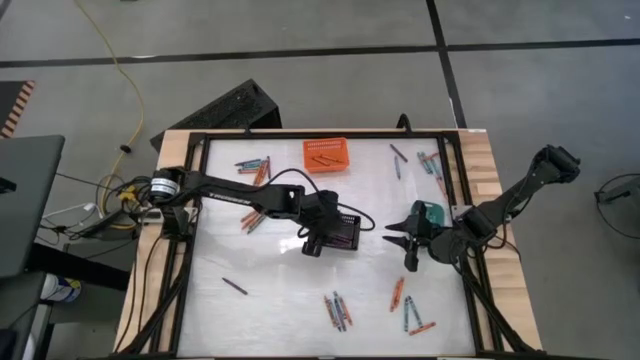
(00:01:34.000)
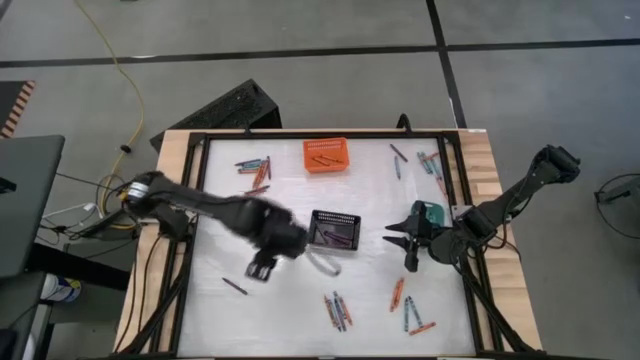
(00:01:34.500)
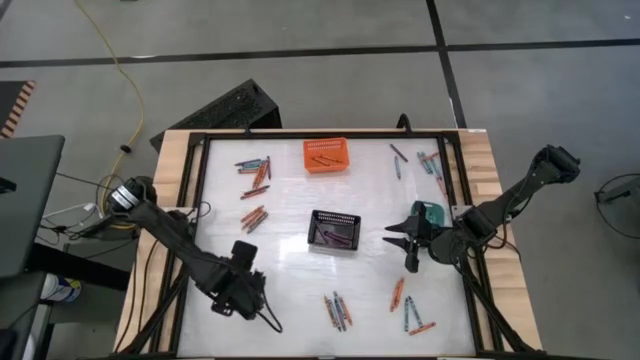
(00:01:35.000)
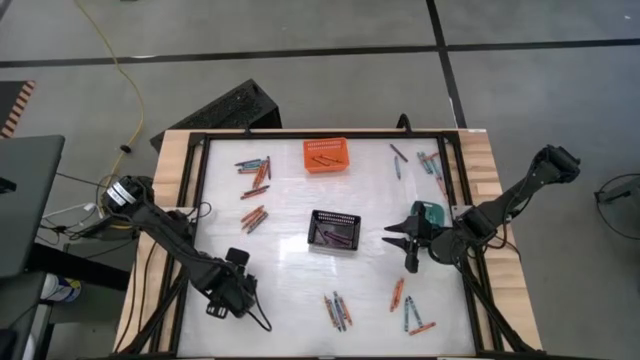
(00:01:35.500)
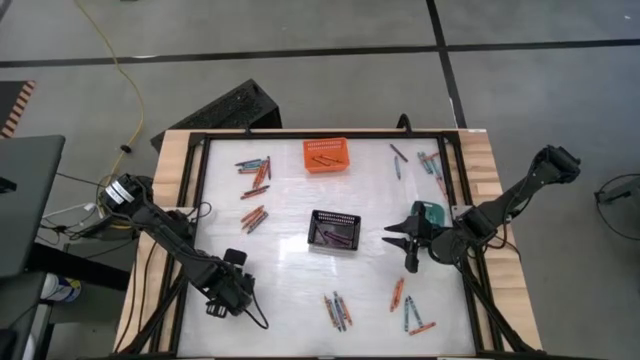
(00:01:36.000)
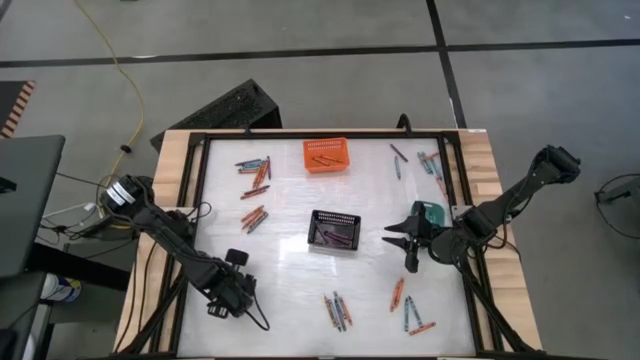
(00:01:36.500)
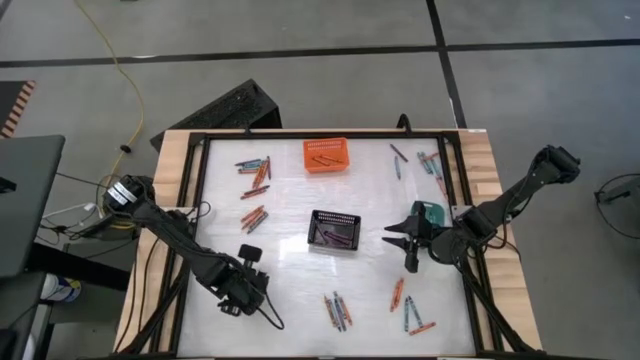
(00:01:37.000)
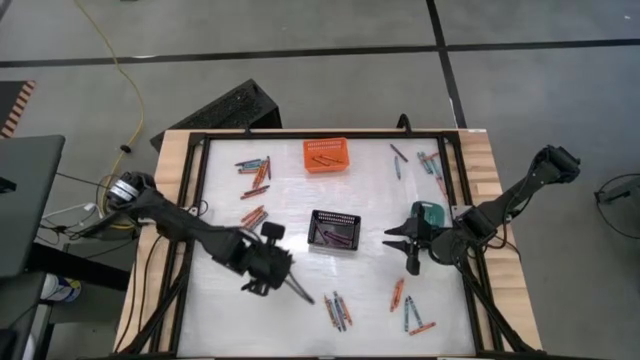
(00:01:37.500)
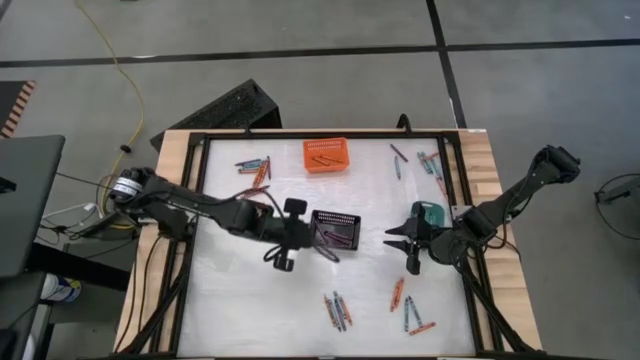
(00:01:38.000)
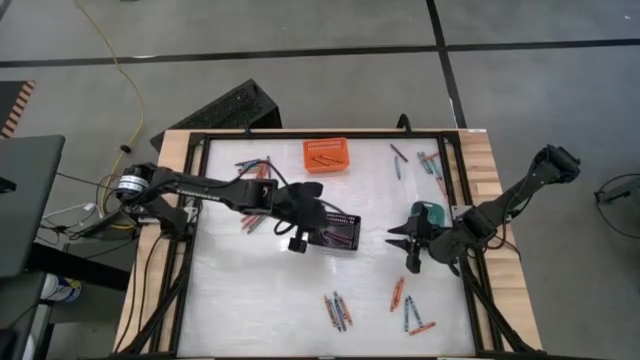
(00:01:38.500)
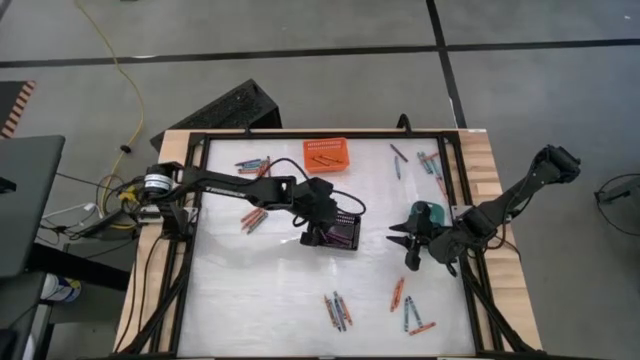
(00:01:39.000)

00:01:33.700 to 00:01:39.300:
Task: Sort crayons
Put the violet crayon into the black bin

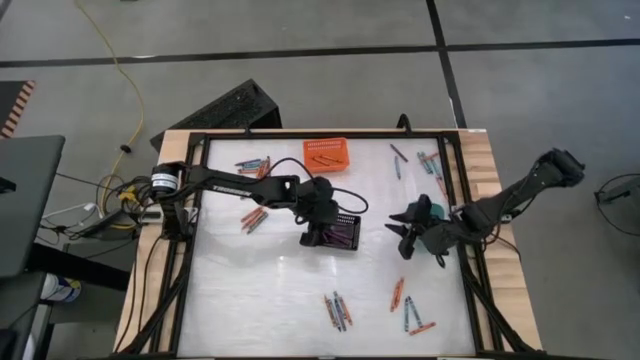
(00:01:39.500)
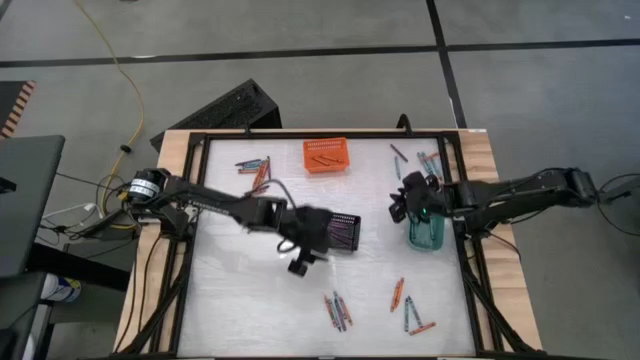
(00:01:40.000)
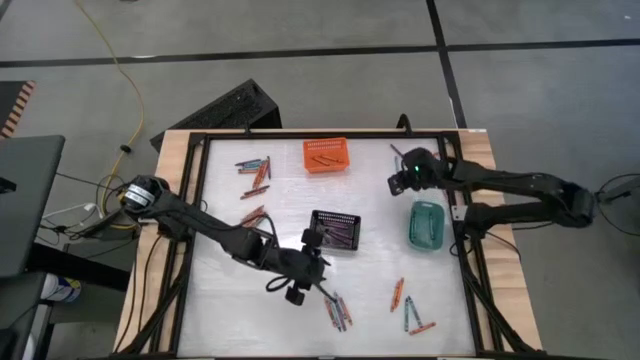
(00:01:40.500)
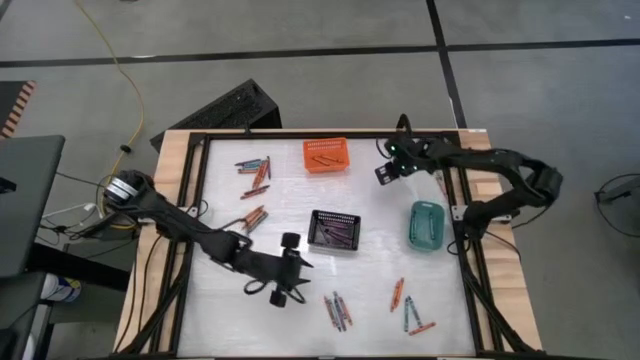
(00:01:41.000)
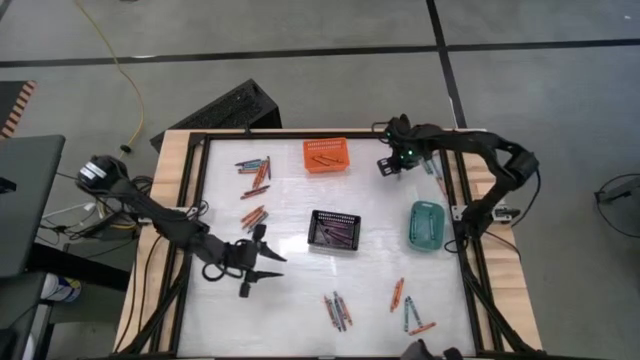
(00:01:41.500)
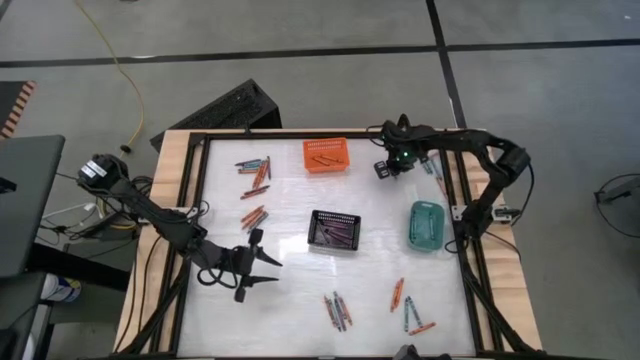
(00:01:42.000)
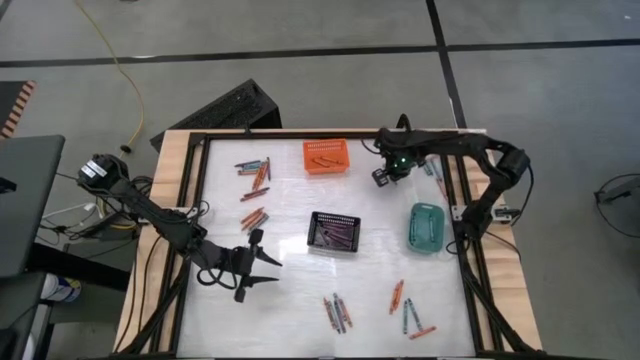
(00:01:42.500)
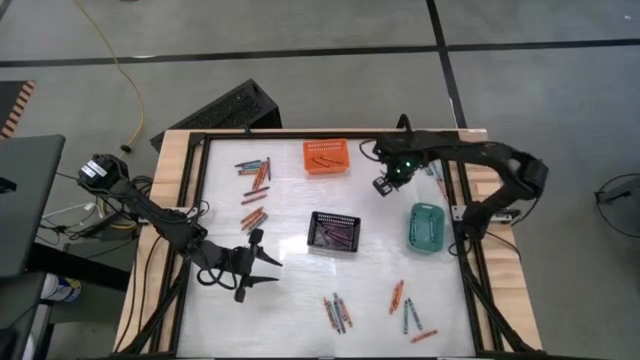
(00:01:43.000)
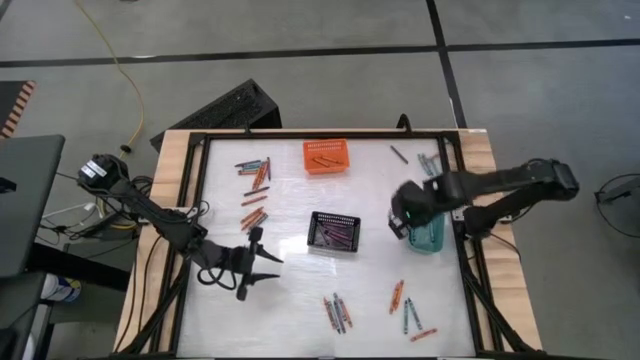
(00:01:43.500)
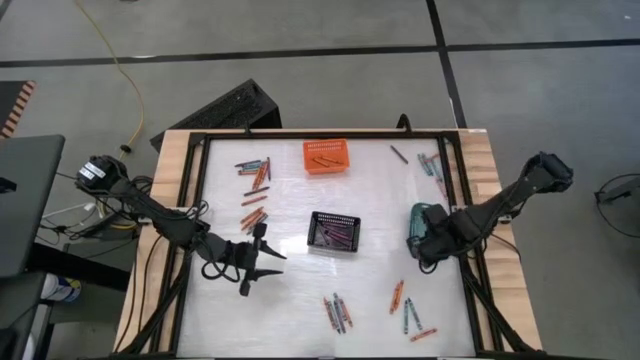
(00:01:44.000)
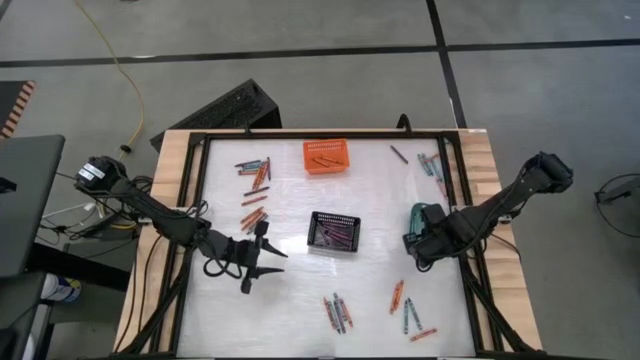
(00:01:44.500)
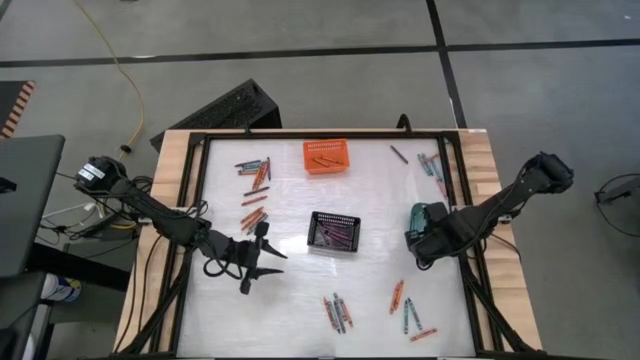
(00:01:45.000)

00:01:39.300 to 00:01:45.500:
Put the light blue green crayon into the green bin

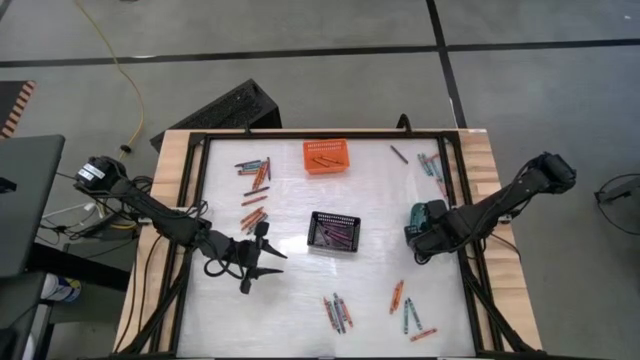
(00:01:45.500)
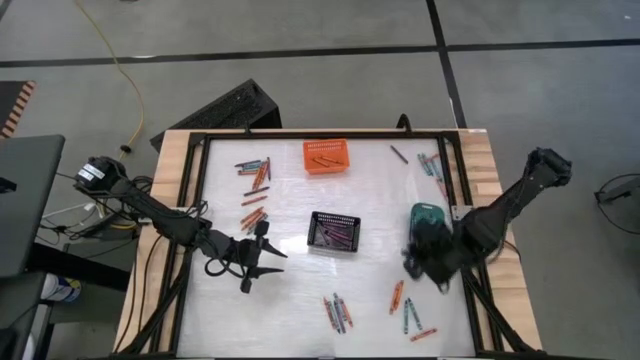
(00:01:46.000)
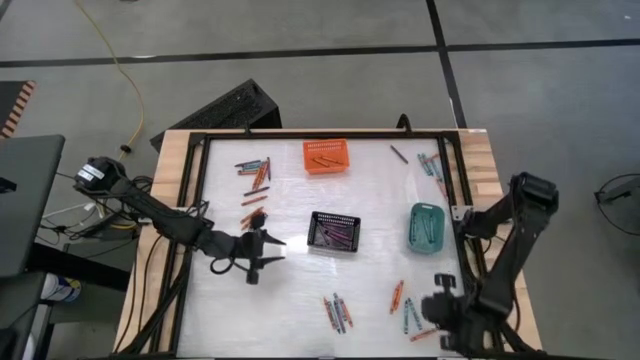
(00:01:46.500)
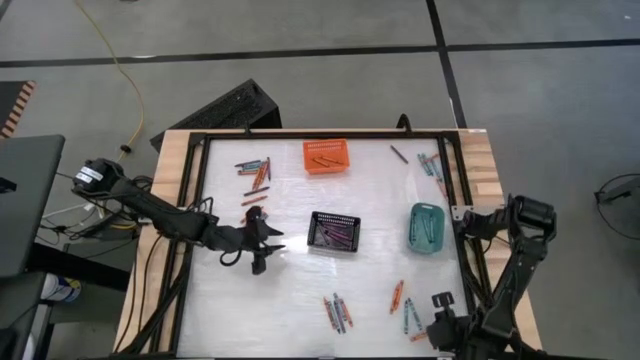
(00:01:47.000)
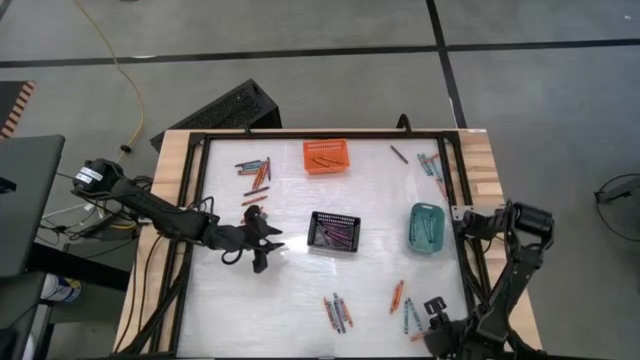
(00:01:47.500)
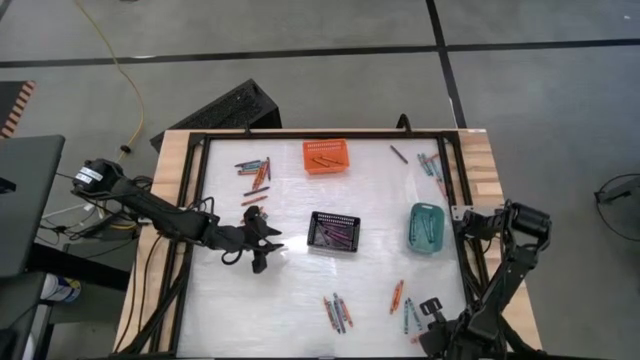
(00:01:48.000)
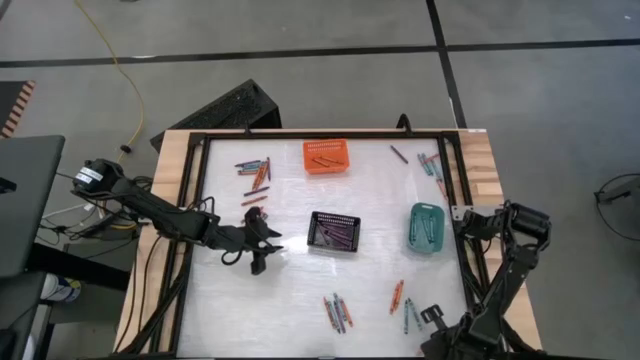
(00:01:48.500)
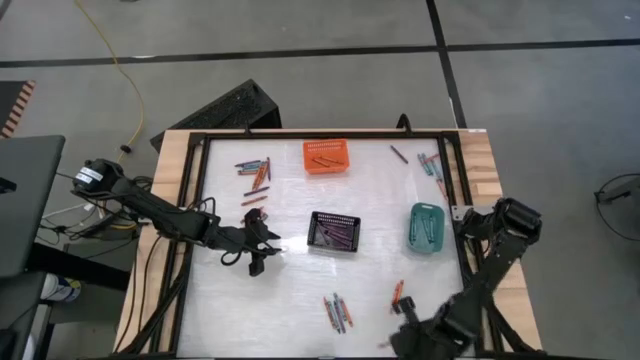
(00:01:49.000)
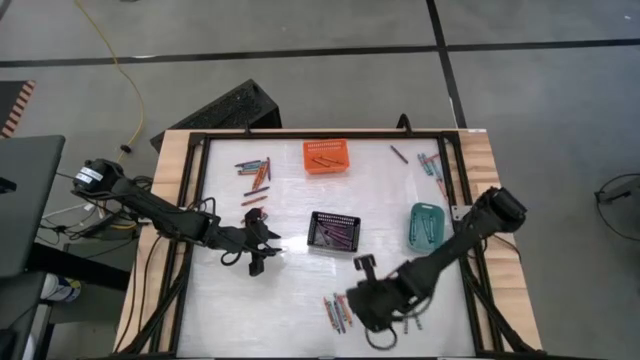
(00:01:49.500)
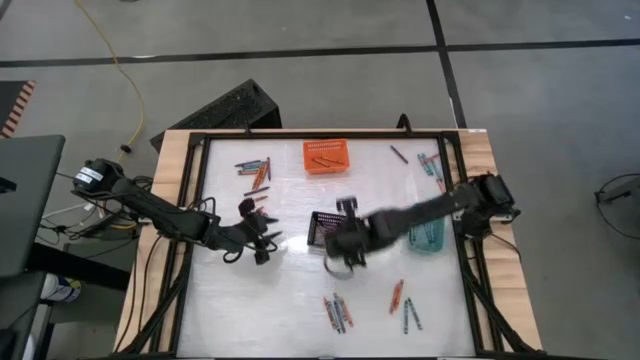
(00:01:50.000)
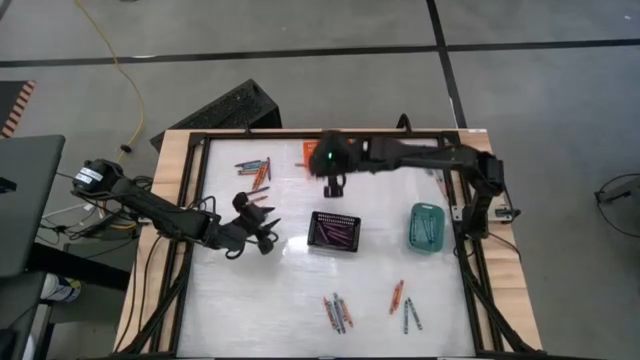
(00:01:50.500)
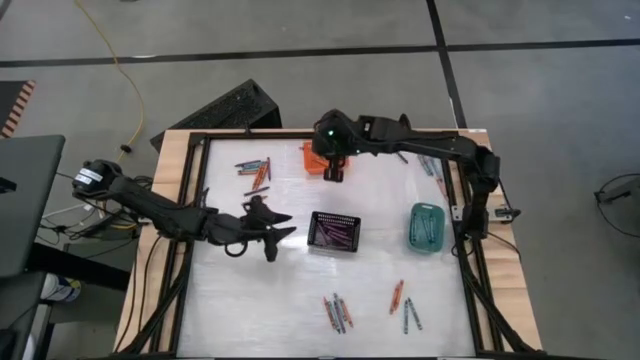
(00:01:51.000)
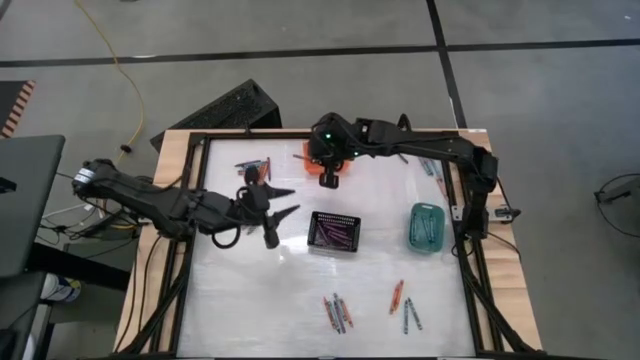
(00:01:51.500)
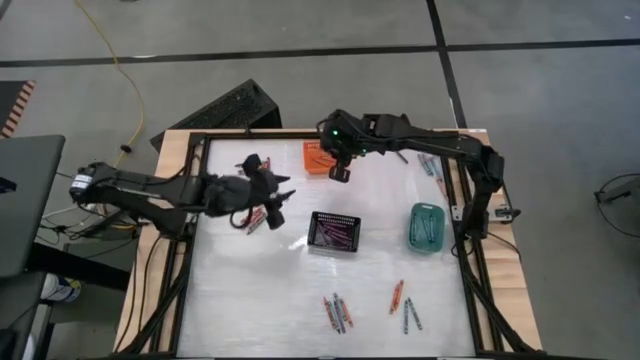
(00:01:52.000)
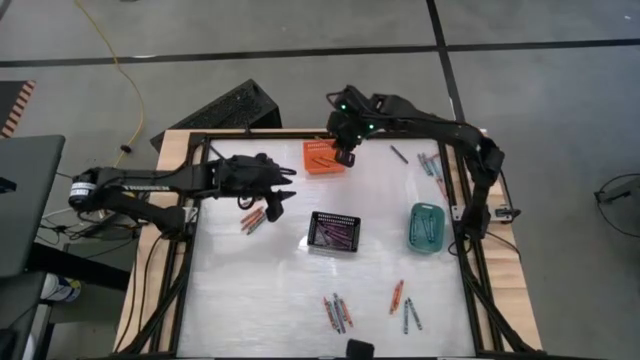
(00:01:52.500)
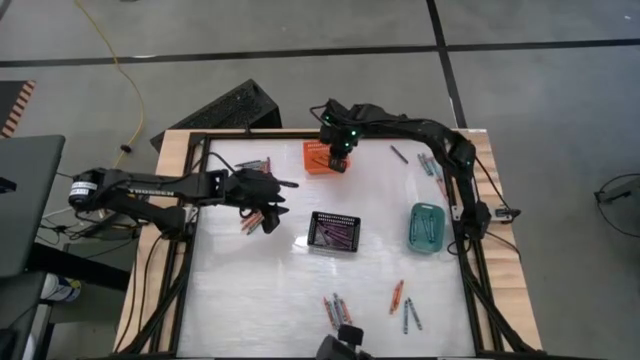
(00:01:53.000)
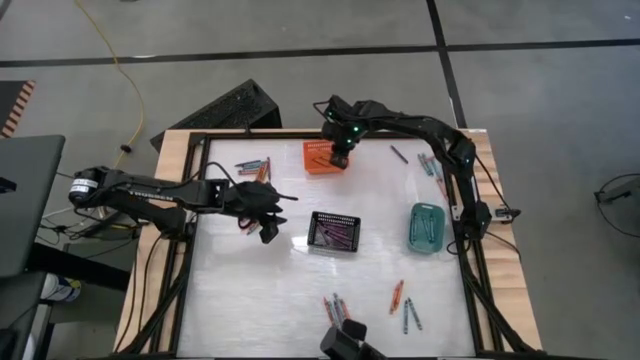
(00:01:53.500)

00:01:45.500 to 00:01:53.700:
Put the orange crayon into the orange bin

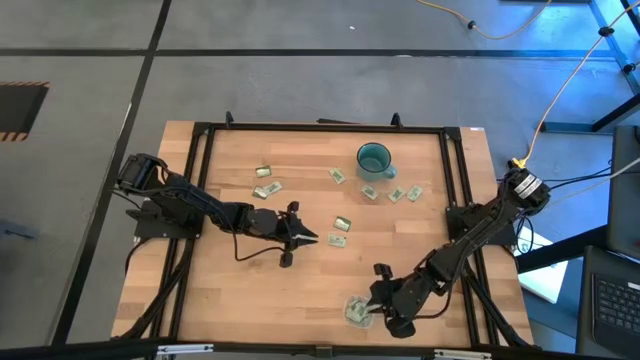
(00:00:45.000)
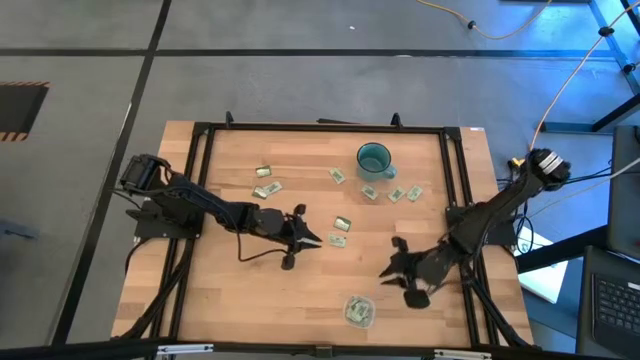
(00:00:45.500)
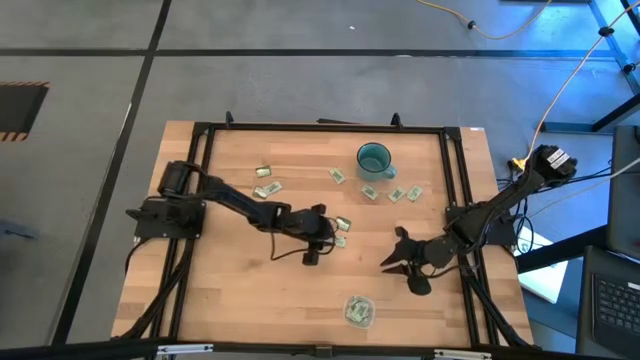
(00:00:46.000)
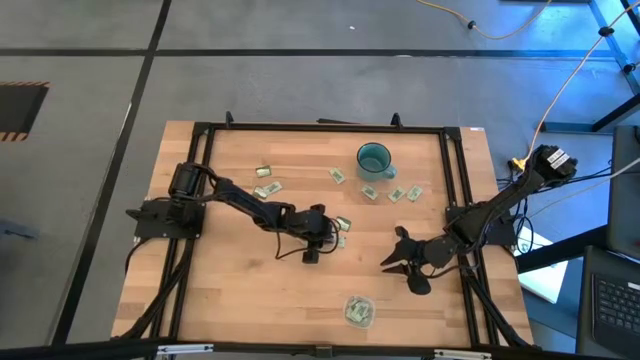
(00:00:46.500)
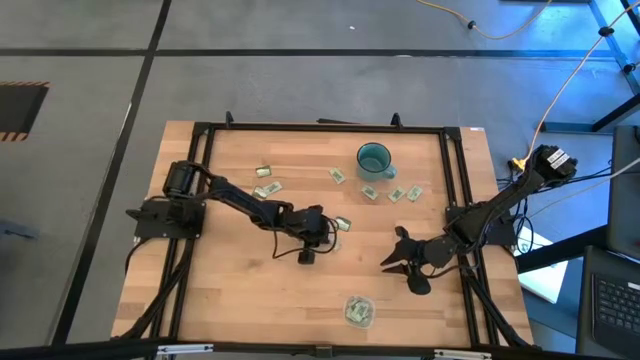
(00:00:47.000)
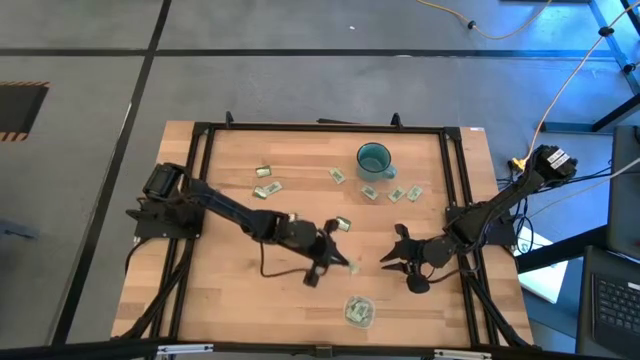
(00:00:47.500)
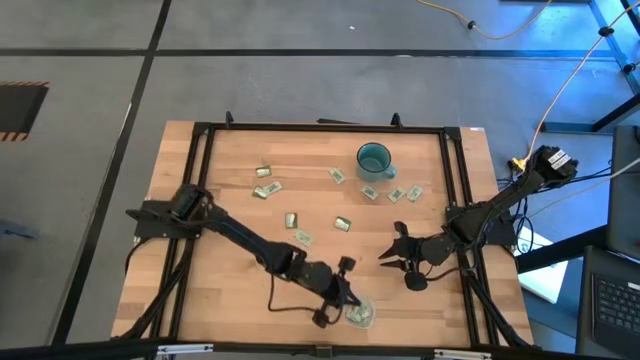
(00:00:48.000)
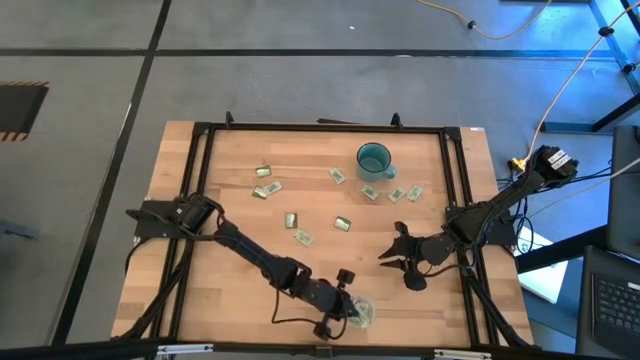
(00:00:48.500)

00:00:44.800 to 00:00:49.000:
Task: Pick and place items into bin
Put the light green stevia packet into the transparent bin
